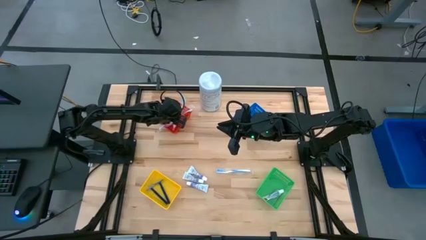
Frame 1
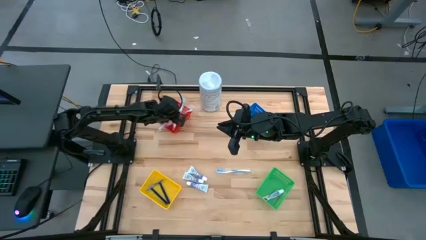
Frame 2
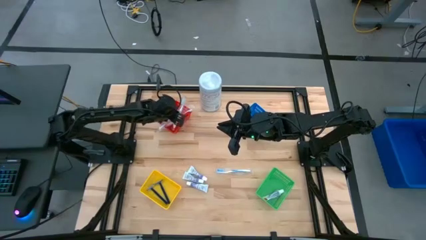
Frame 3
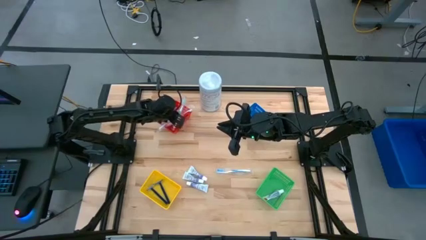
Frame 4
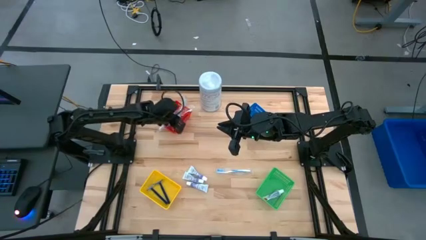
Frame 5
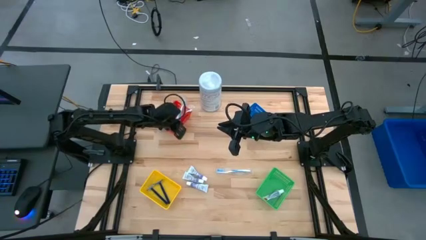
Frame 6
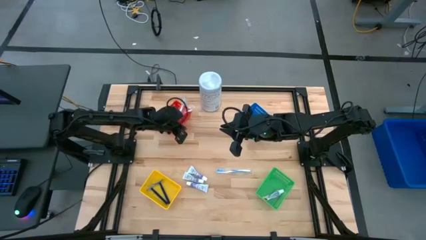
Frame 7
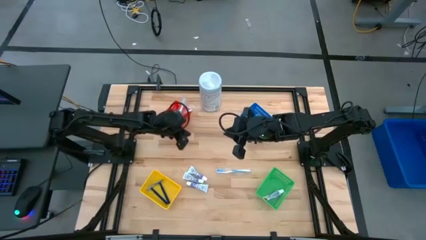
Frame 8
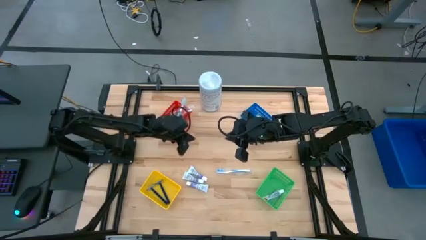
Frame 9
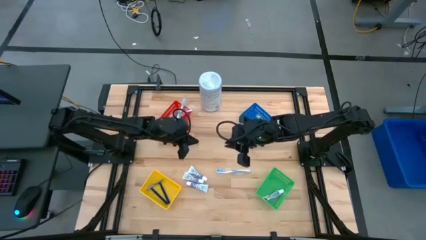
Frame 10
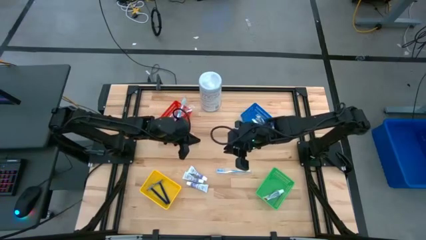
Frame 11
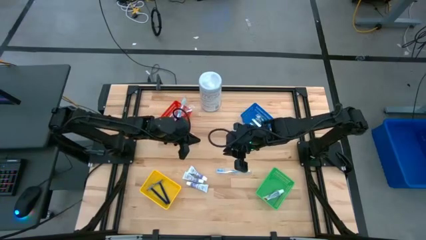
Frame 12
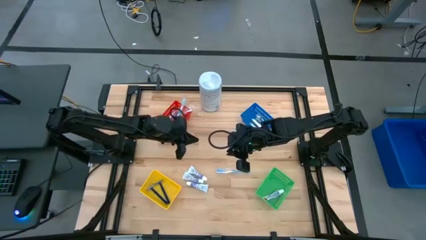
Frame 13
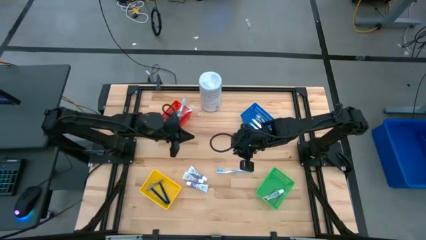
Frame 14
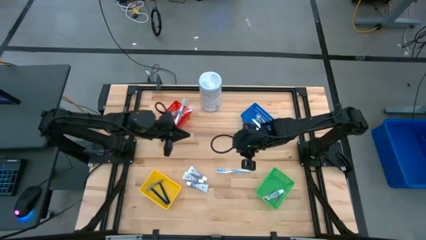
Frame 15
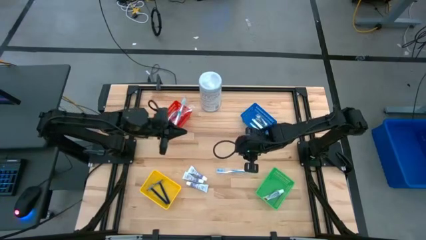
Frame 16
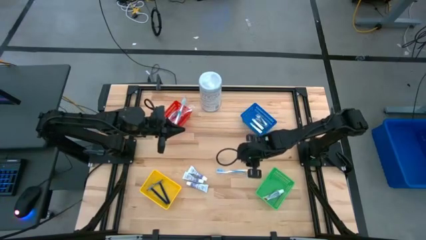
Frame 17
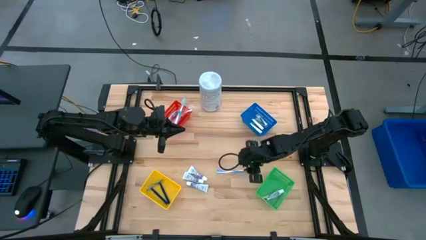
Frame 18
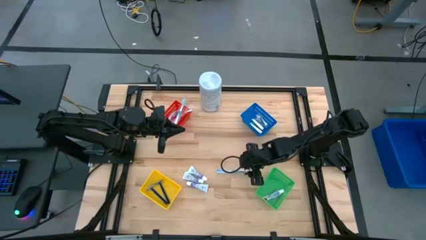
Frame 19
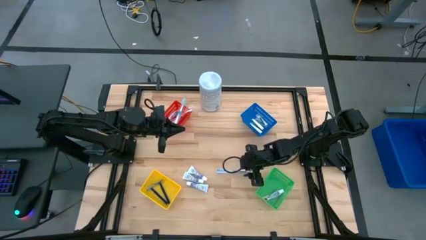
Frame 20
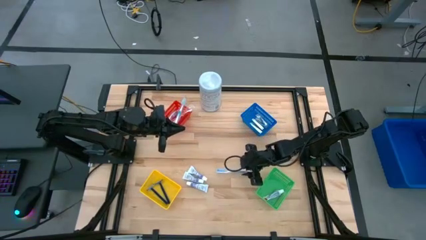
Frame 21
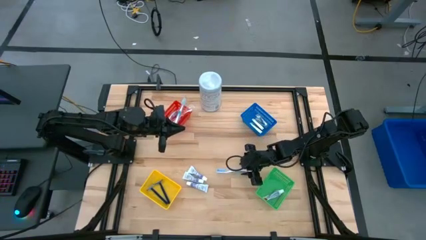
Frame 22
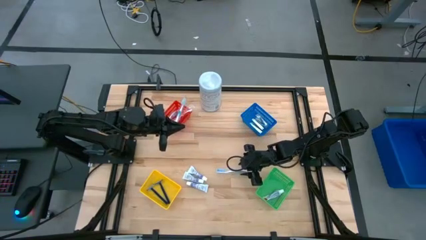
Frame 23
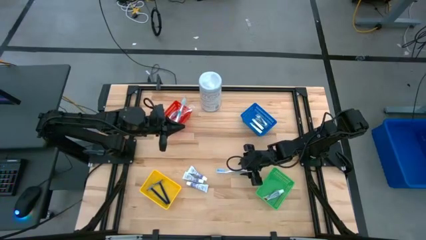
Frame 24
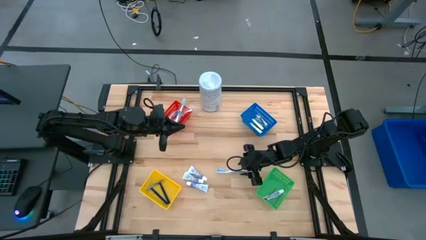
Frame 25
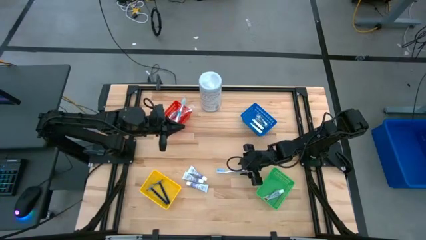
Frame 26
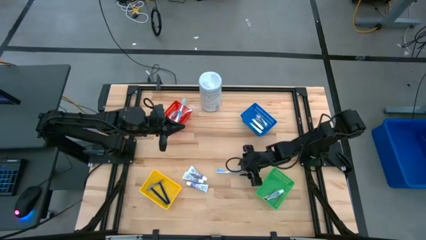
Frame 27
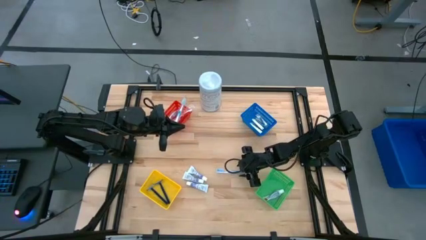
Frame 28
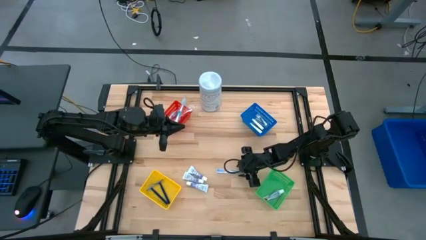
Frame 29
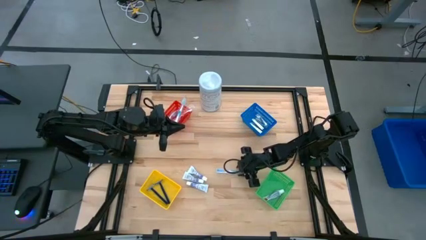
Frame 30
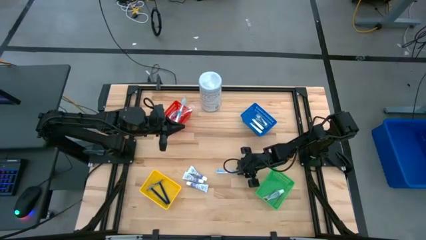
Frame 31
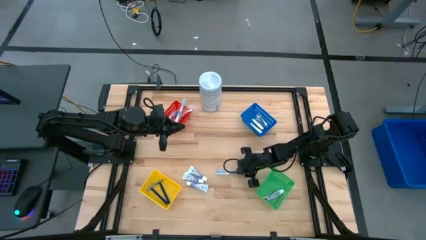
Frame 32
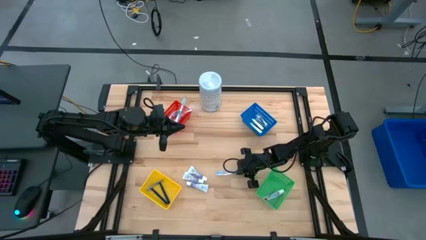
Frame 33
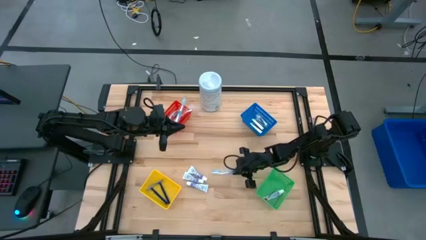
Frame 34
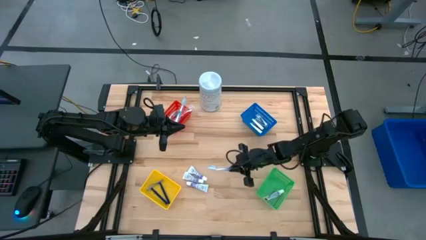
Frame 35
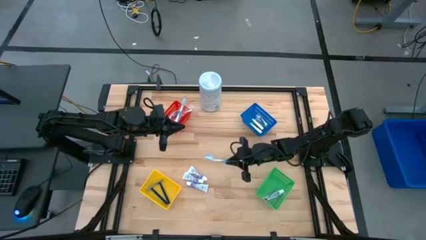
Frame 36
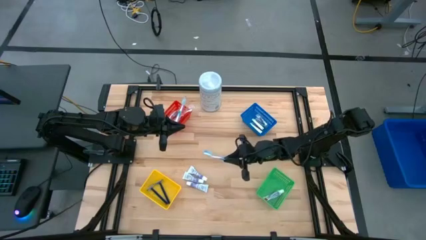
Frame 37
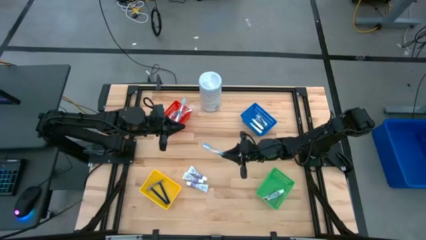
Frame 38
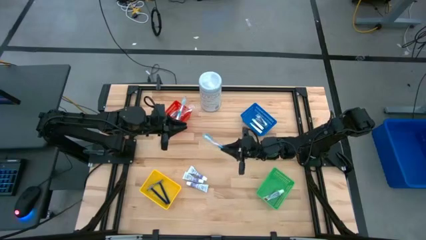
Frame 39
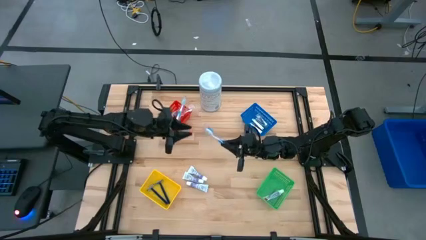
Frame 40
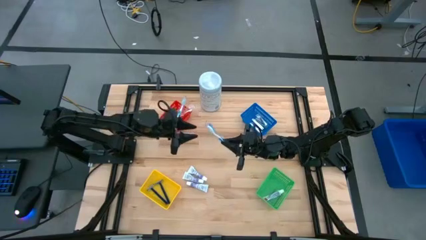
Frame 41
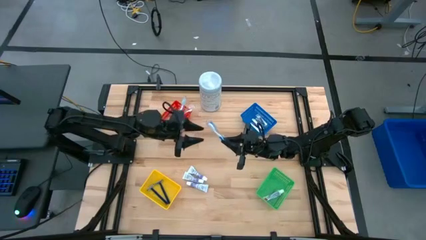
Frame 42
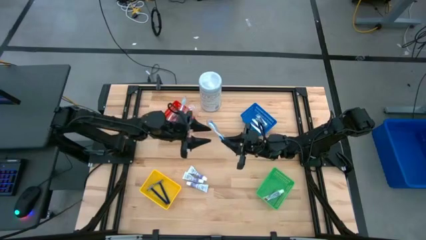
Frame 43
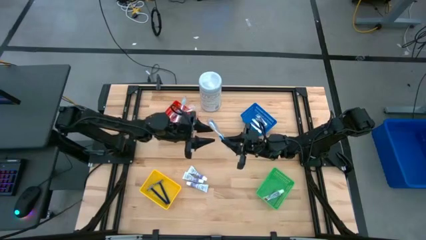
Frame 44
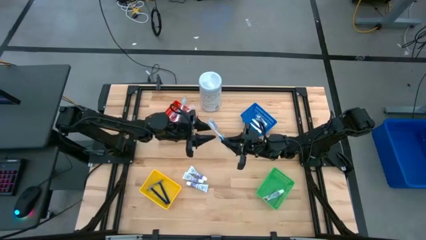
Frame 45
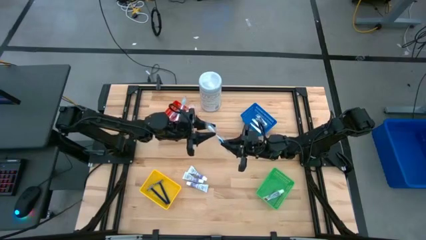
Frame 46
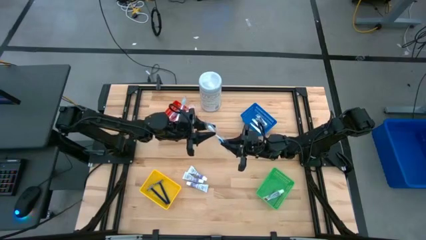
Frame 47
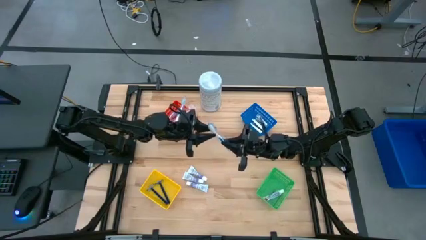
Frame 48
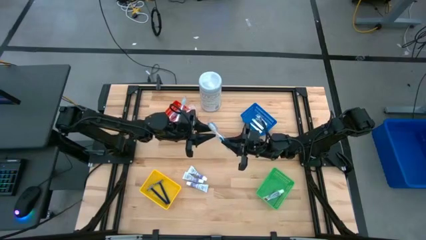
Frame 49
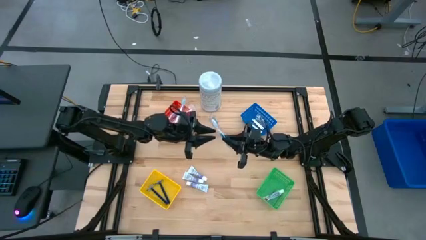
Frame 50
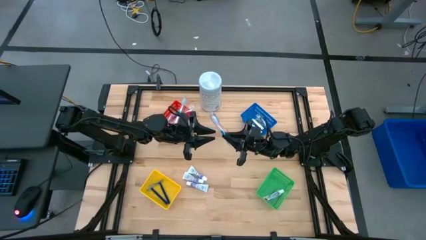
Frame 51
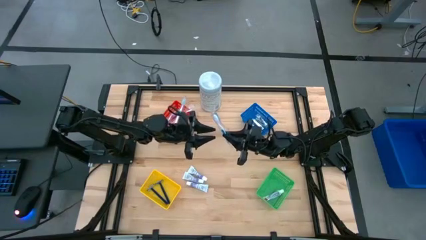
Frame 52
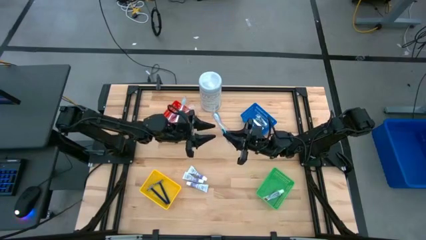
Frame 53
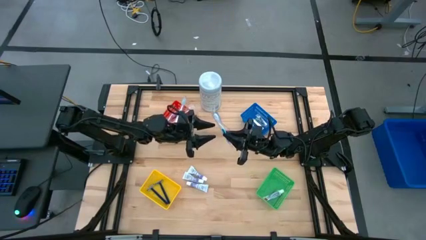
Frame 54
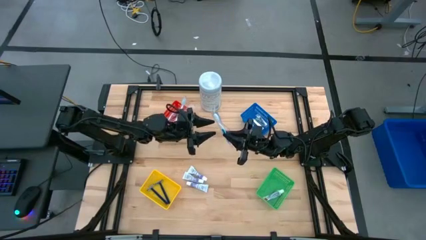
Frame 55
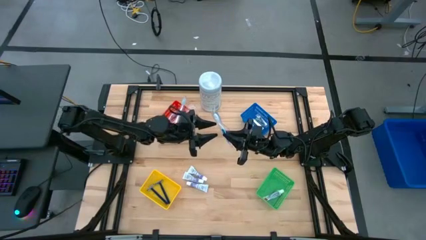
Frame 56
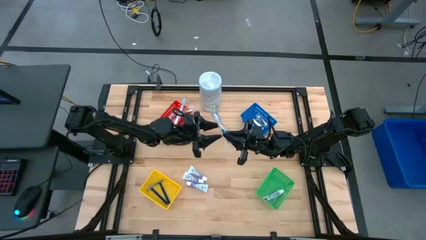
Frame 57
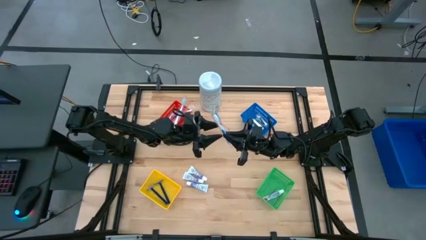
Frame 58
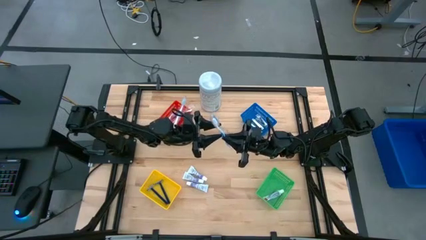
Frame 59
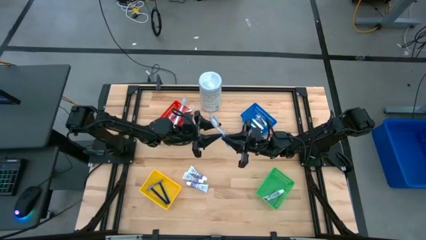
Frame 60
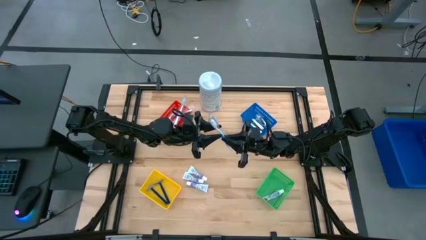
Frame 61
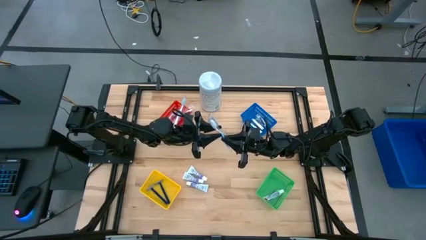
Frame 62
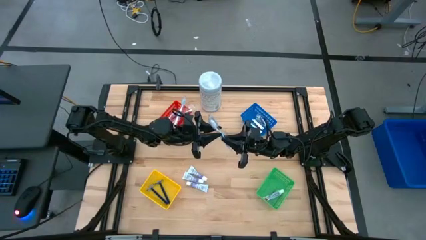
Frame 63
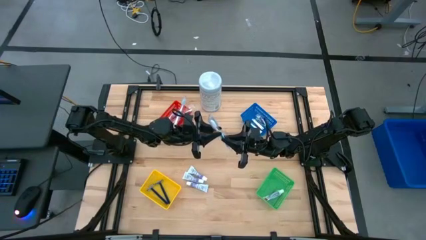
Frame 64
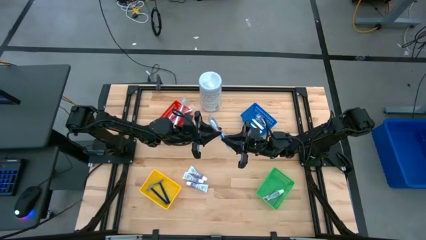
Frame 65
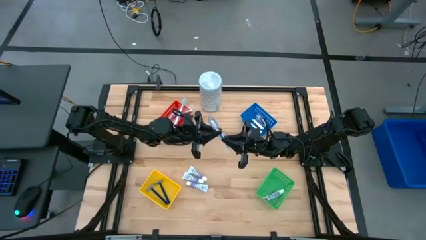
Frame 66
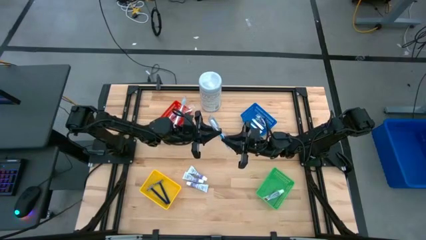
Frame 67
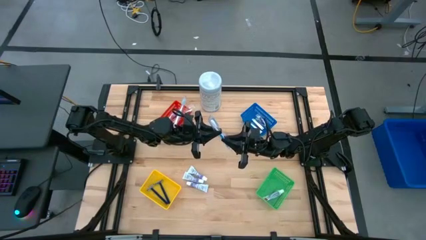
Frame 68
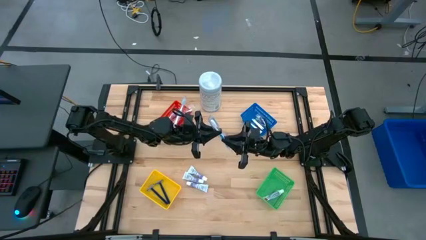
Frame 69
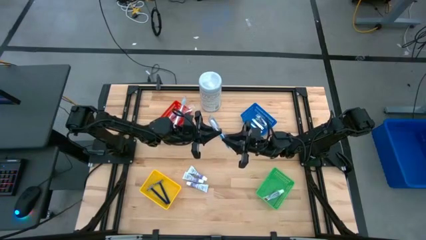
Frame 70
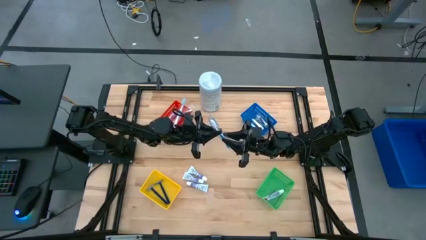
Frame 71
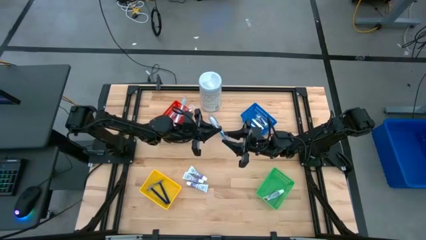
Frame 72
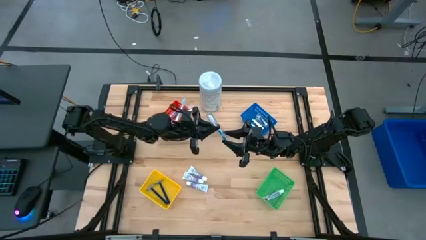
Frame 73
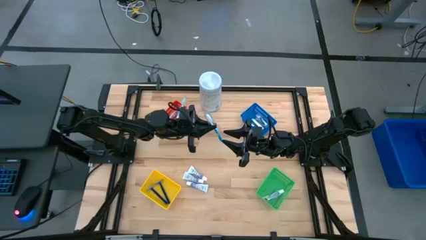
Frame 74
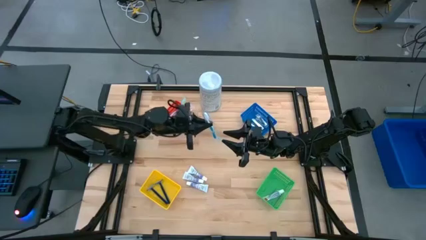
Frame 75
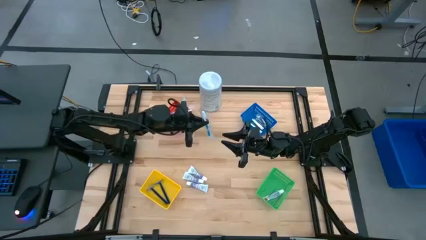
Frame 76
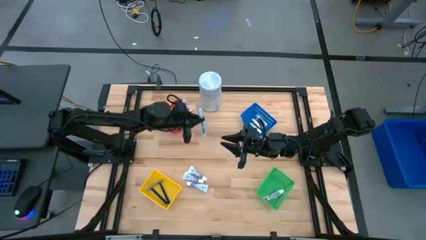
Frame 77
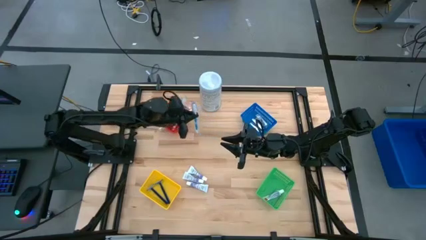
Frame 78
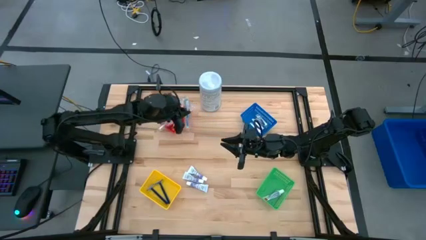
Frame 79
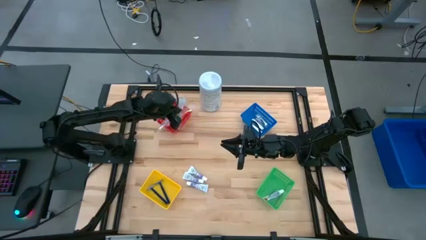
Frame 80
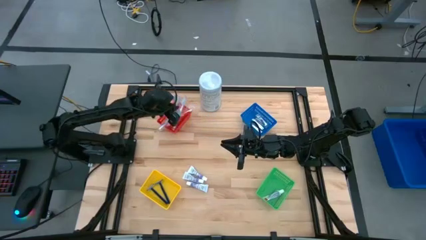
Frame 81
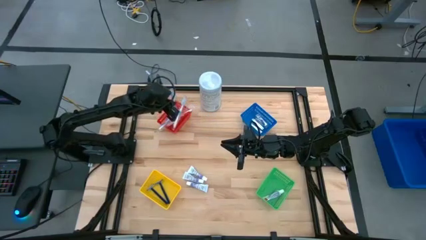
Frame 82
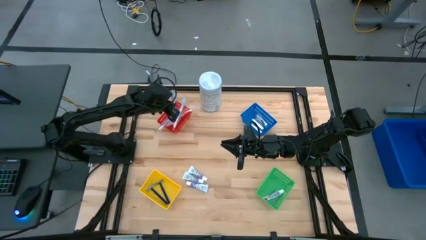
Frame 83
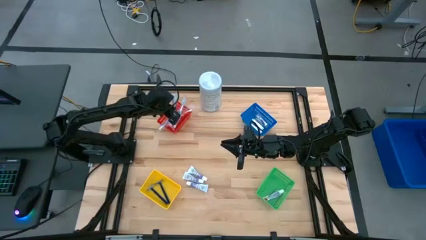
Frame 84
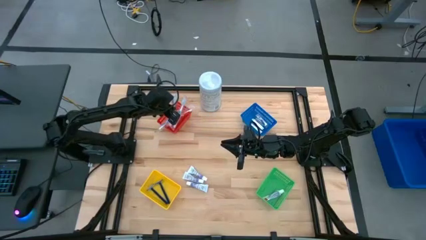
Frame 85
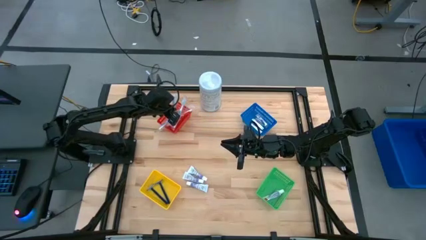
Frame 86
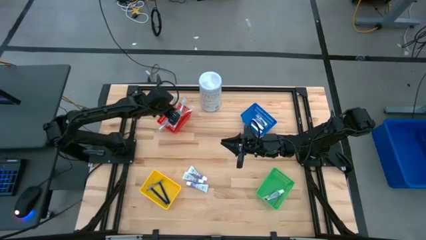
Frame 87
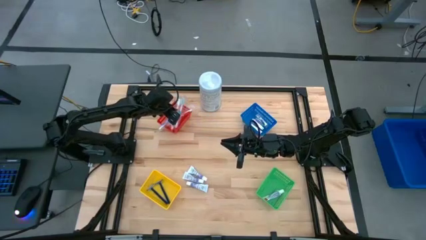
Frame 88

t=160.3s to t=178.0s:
Task: Pick & Place Travel size toiletries
Put the blue toothbrush into the orange basket
